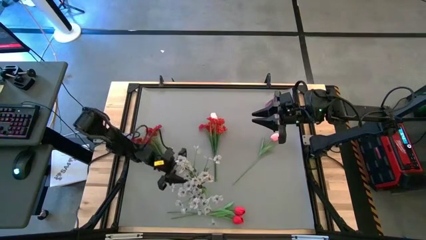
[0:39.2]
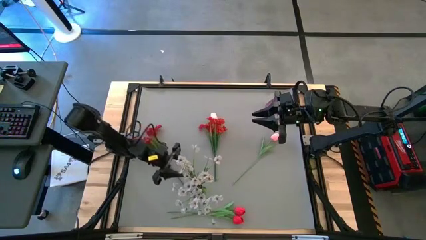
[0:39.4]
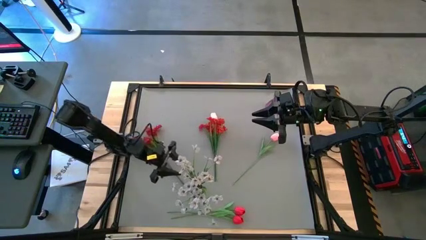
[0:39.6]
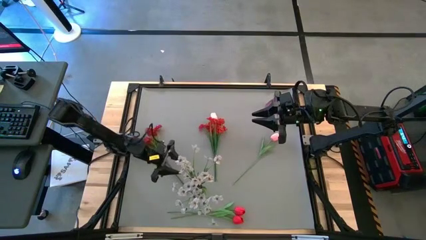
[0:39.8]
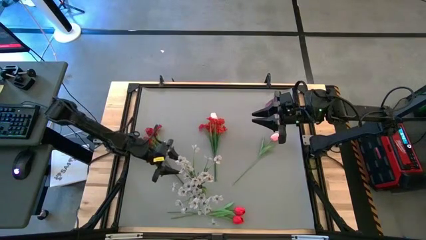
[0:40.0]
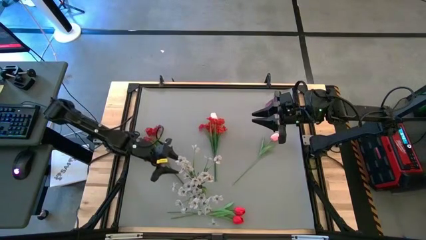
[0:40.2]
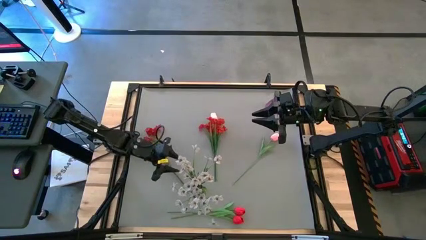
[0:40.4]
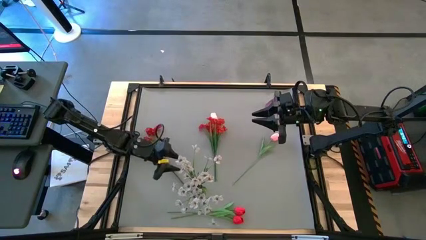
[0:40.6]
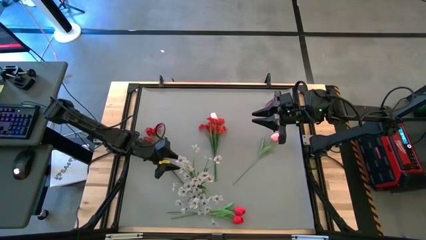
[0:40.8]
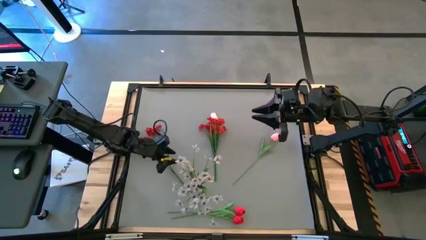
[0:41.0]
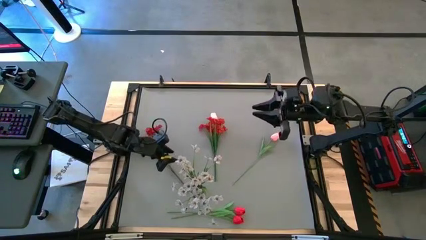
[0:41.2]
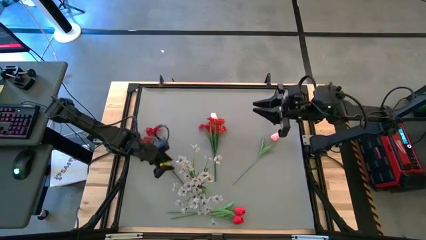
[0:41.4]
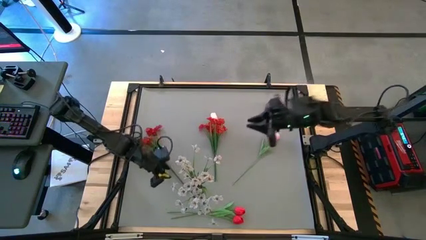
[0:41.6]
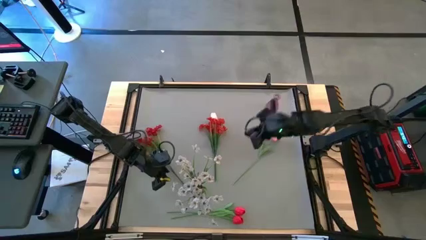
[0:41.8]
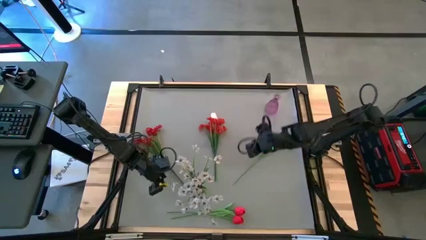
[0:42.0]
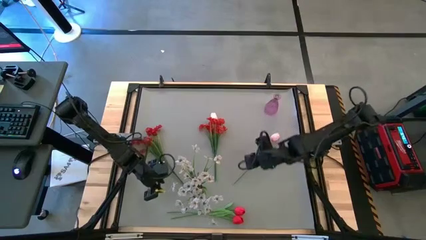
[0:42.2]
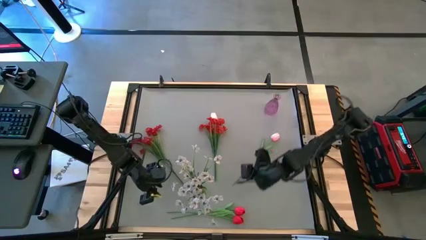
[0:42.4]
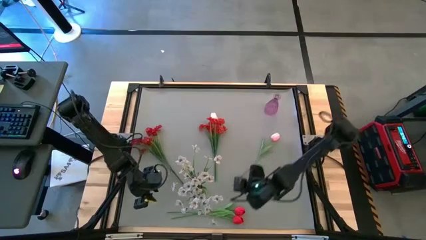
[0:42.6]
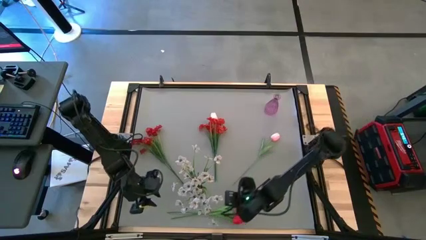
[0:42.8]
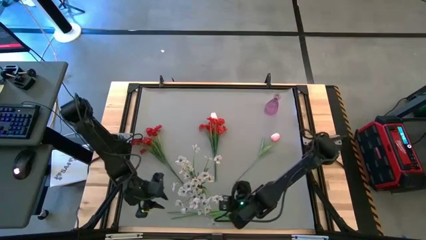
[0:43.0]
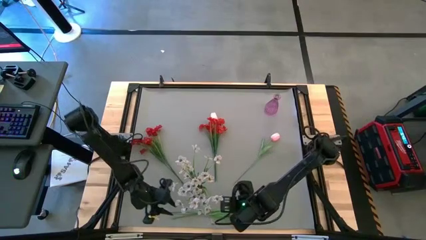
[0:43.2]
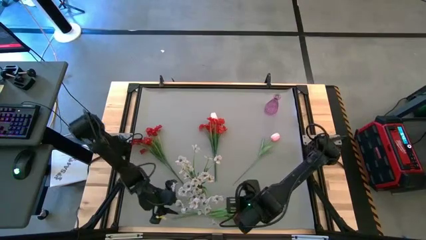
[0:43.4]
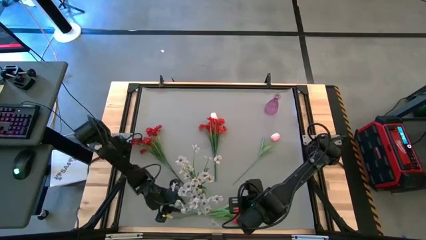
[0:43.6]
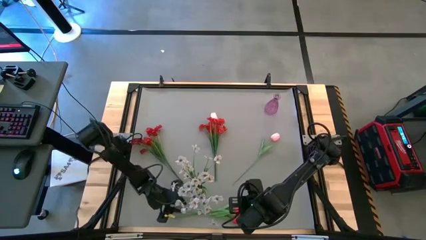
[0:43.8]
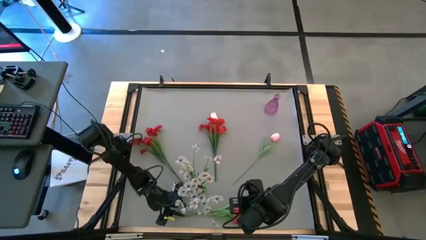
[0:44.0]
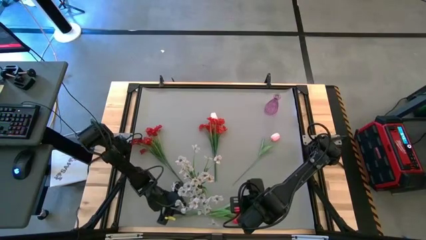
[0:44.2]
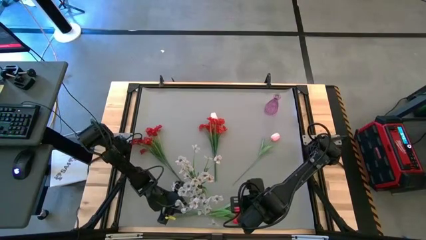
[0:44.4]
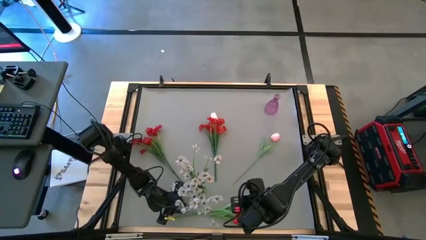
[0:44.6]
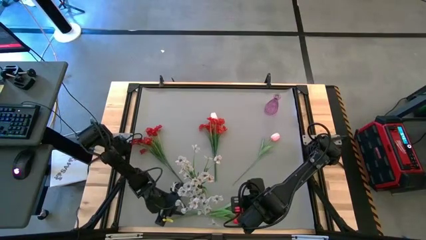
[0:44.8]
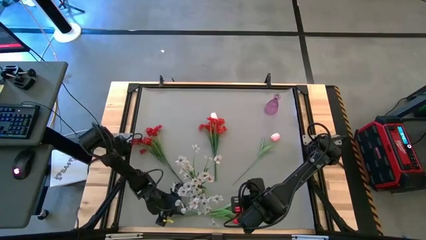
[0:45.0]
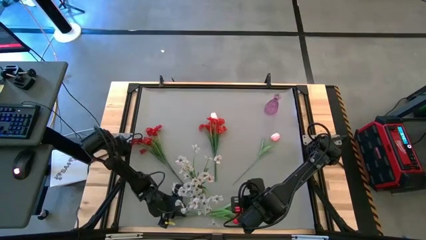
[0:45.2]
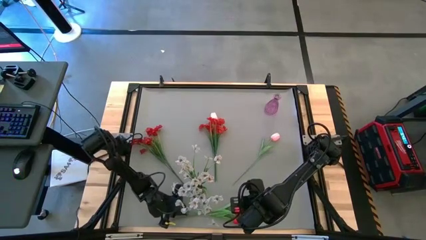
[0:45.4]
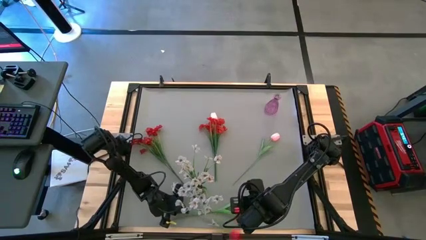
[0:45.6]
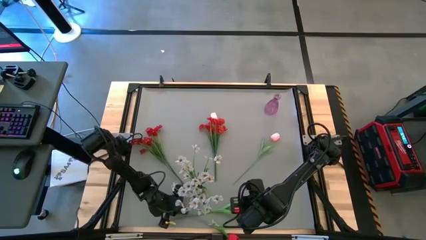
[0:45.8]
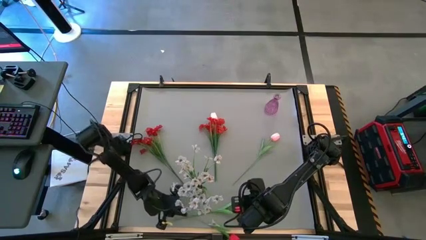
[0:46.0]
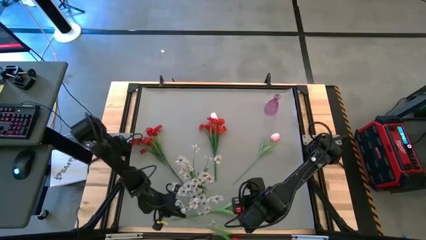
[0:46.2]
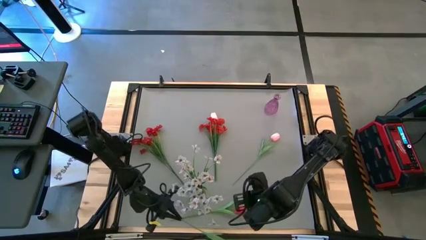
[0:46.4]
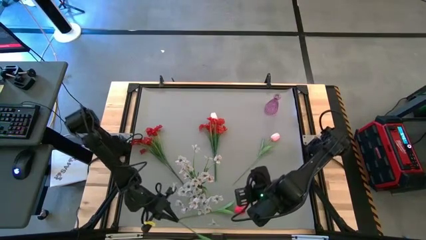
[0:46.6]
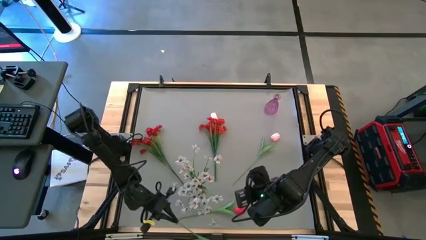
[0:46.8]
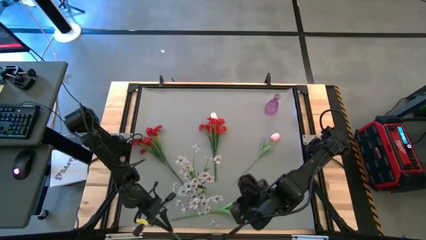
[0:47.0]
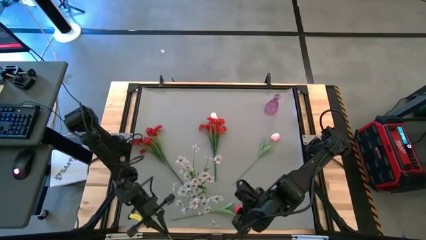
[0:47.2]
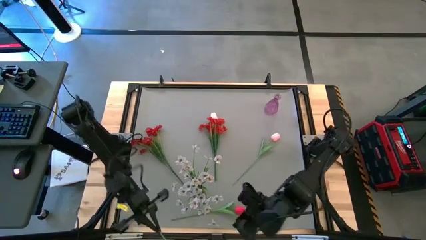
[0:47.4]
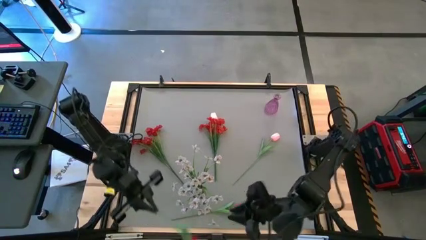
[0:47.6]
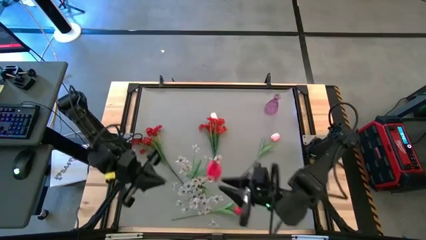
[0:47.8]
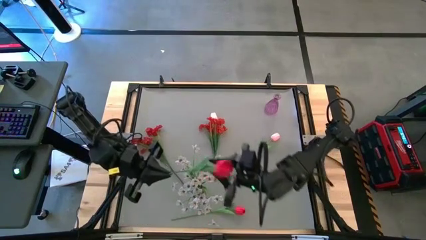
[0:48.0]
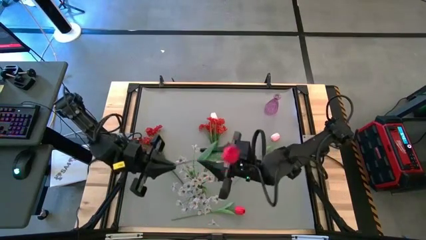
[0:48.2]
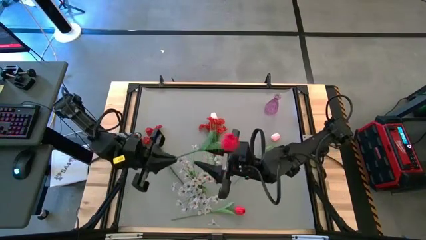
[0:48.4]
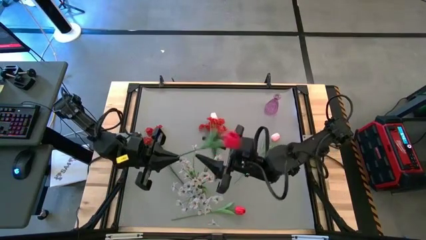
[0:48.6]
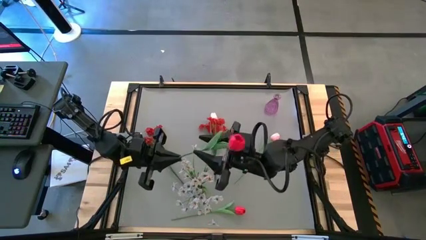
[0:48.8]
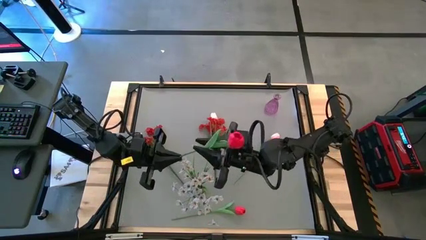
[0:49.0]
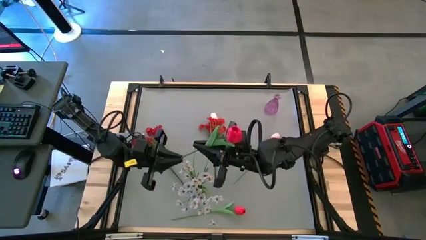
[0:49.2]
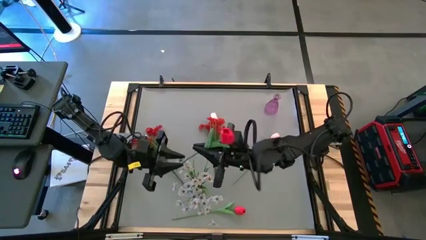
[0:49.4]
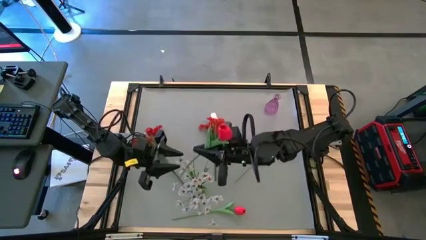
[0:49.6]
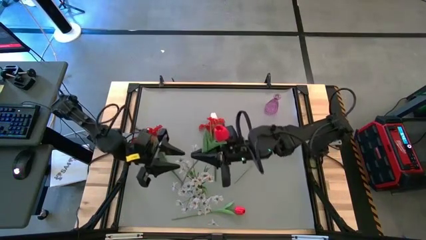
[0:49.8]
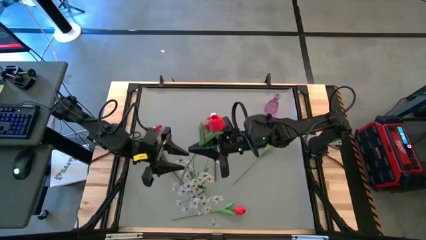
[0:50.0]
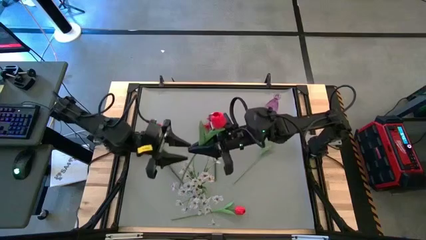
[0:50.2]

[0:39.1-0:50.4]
Task: Sort flowers into vase by color
Put the bottom red flower into the green vase

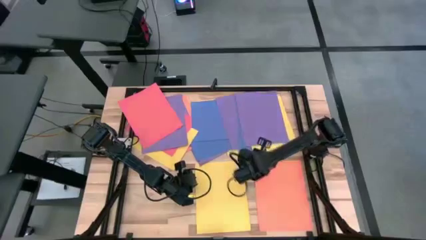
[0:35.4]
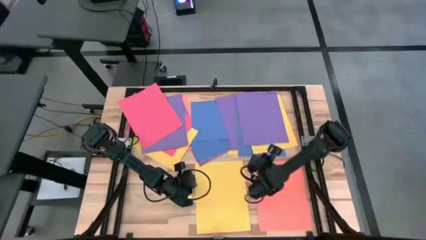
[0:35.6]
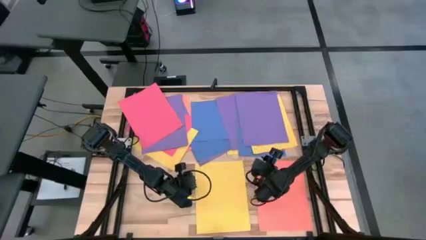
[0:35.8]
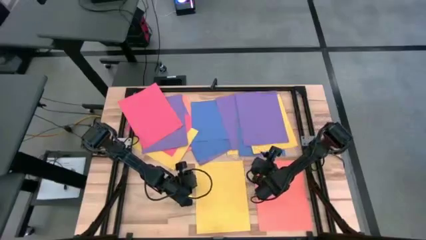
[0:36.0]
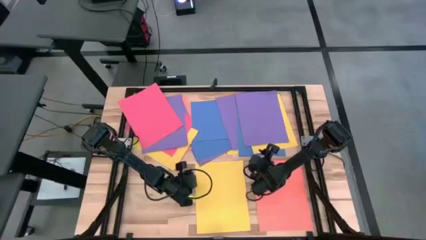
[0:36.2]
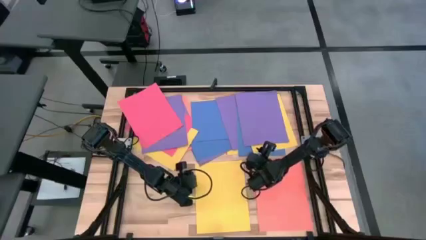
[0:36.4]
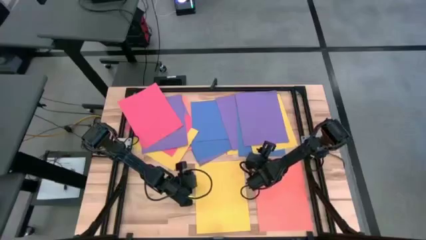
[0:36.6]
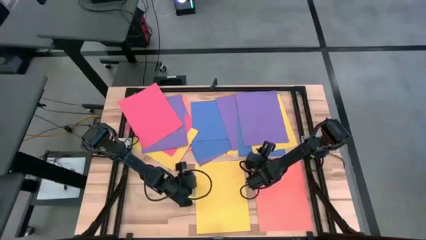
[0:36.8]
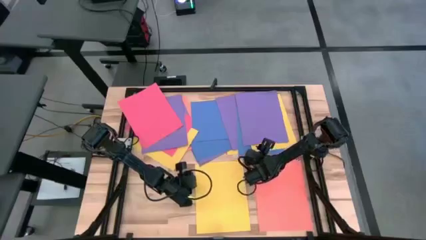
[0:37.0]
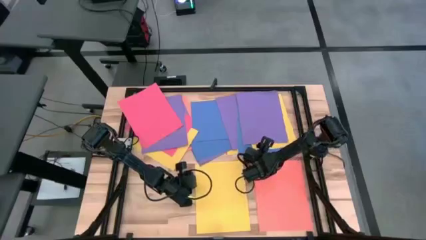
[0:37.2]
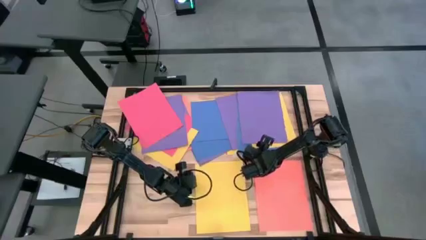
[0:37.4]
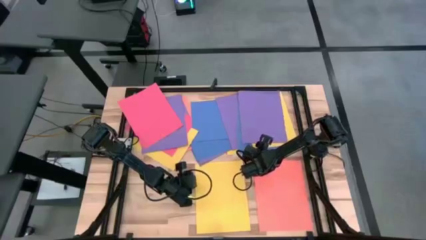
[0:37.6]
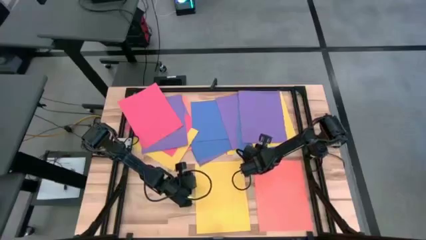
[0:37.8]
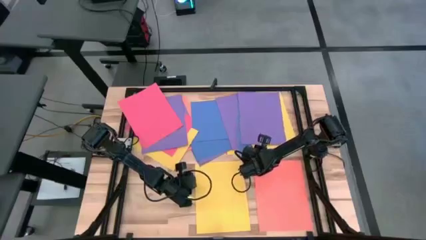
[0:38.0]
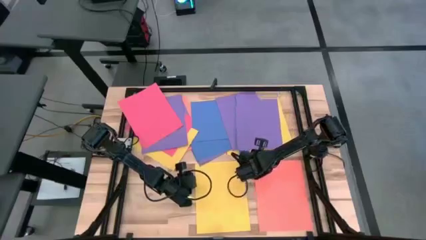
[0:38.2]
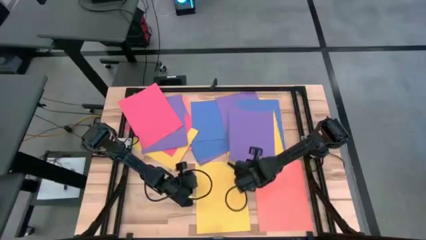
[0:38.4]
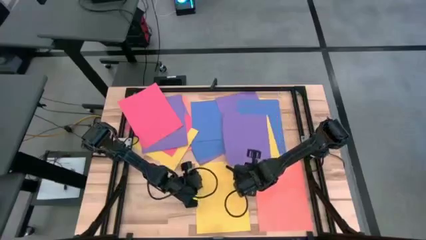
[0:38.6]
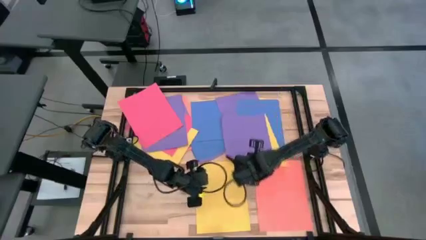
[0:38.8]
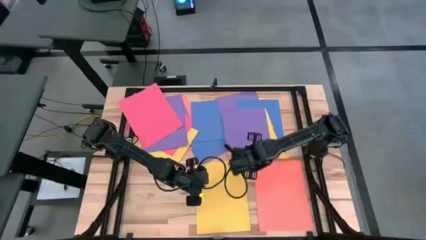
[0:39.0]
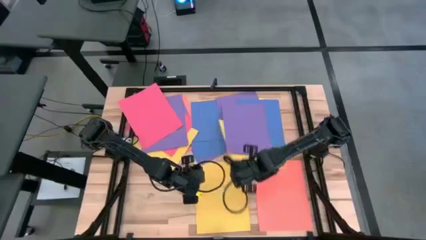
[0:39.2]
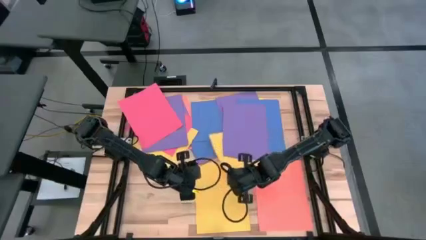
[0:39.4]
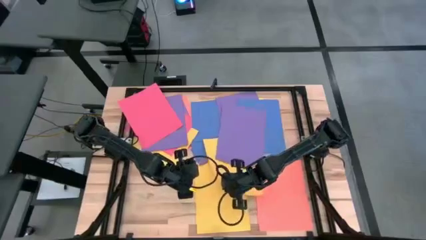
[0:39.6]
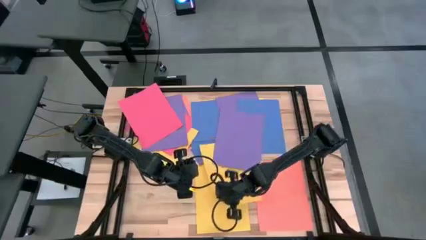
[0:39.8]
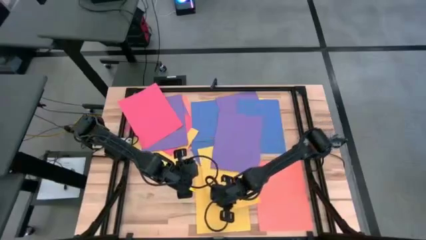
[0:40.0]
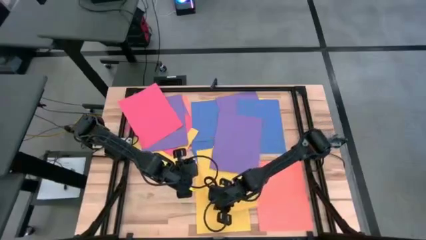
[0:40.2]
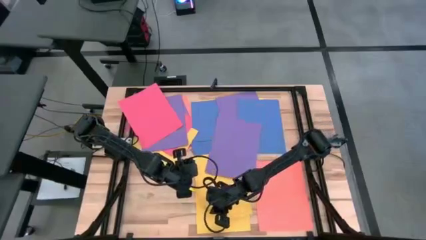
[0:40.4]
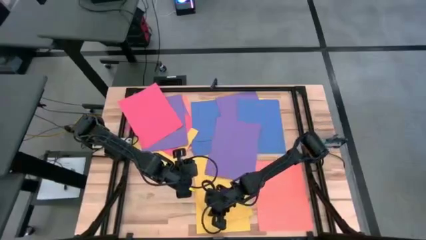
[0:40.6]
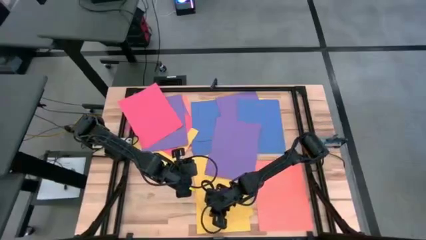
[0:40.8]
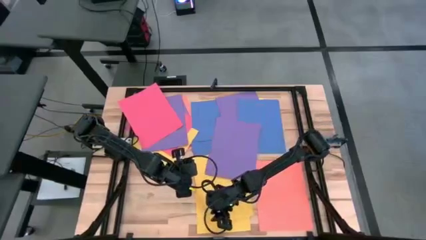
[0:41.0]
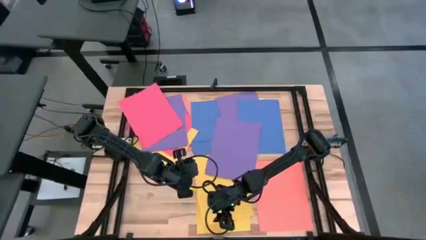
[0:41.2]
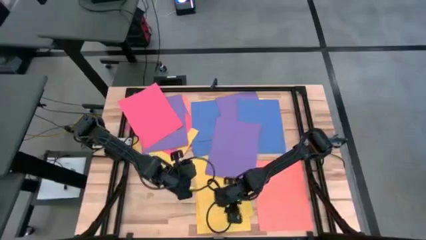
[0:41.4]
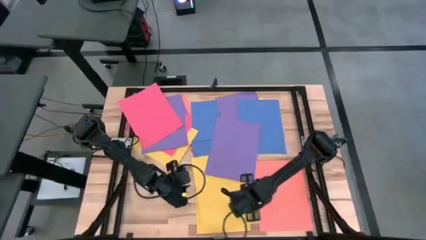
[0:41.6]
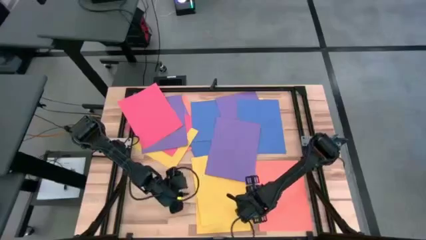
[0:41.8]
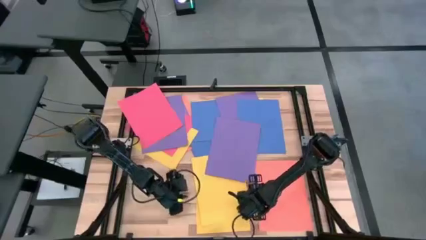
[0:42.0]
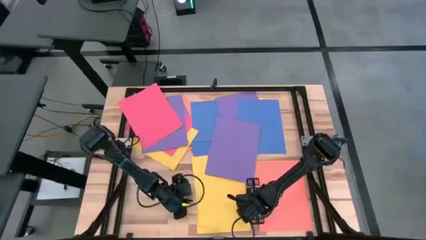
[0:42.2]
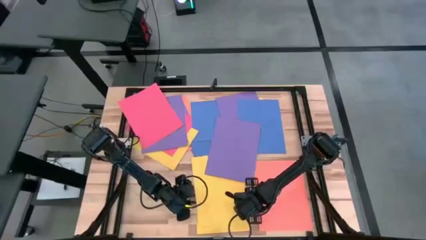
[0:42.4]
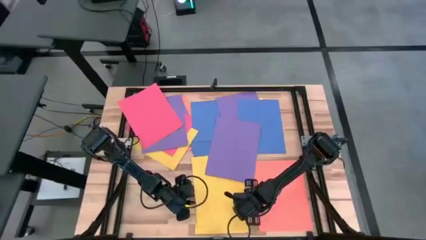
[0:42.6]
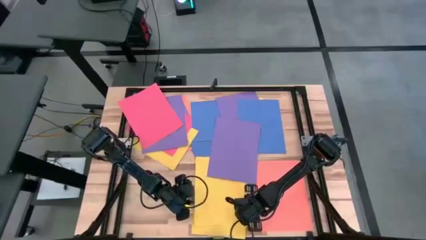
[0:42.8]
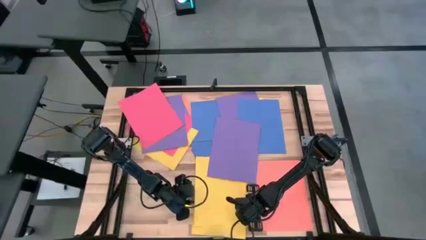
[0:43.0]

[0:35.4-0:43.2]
Task: Organize paper
Stack the yellow paper on top of the yellow paper
